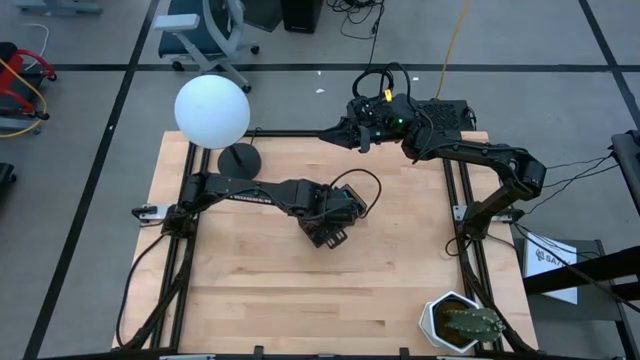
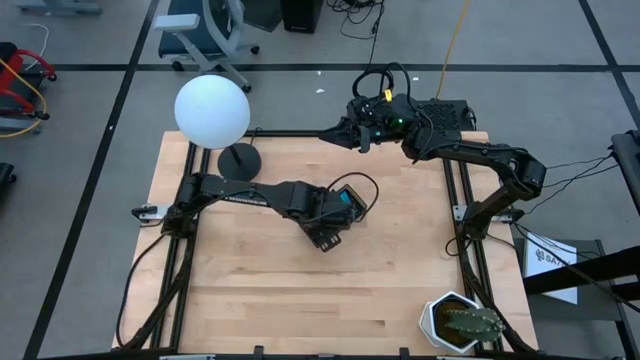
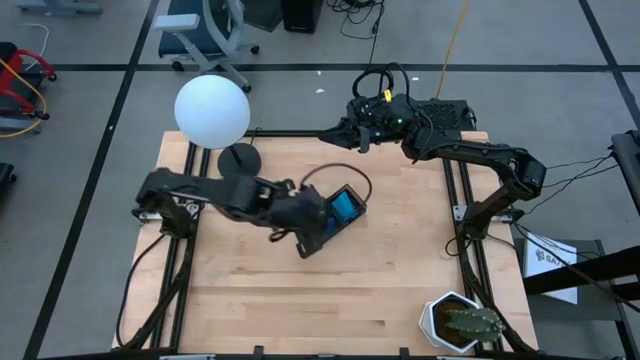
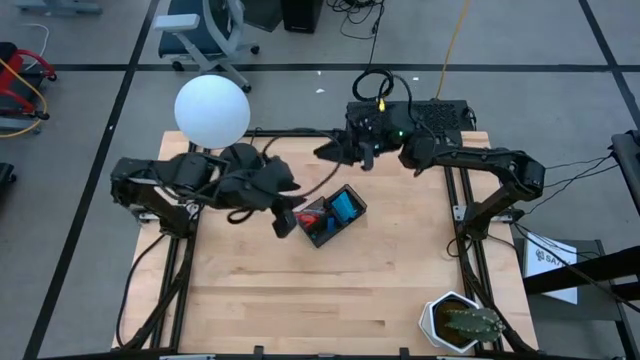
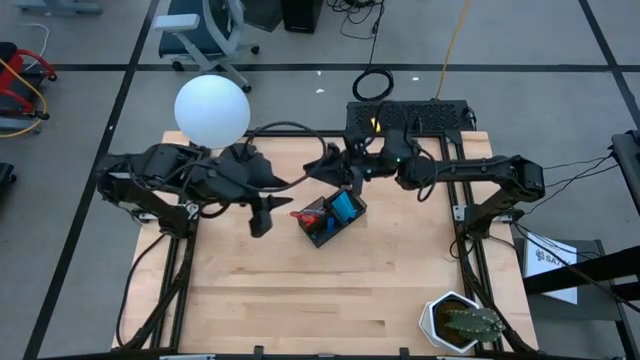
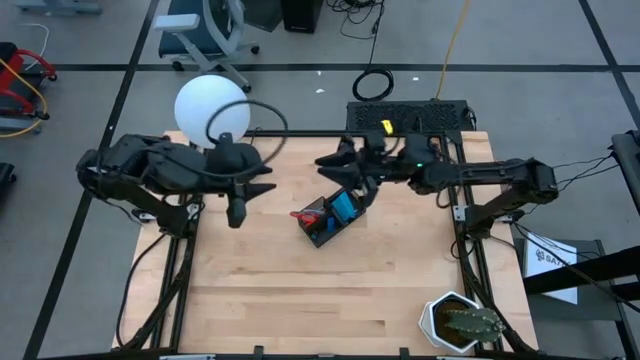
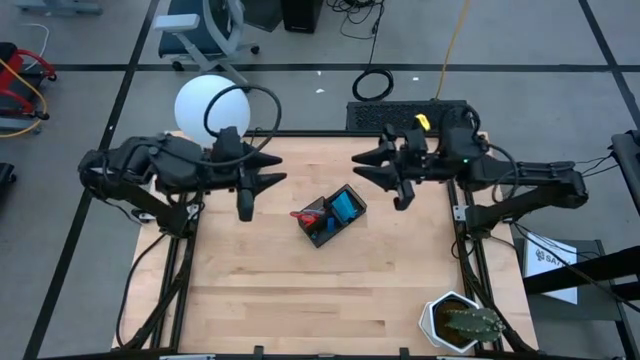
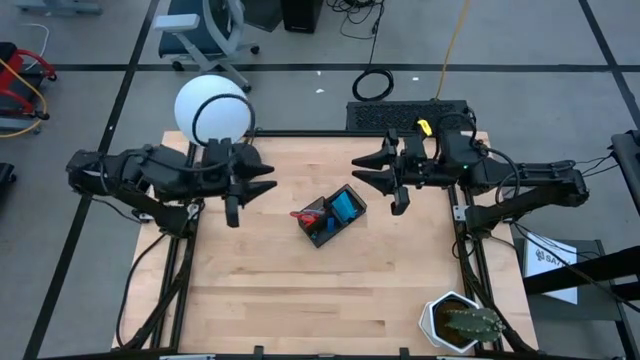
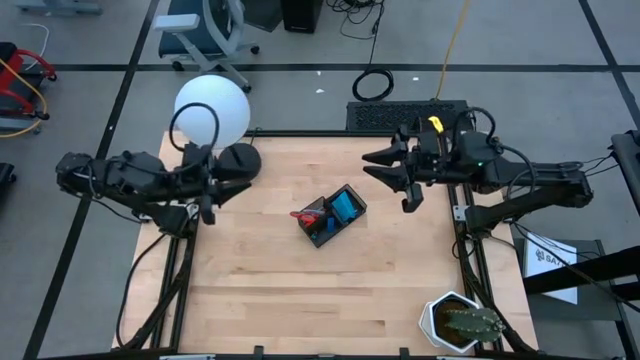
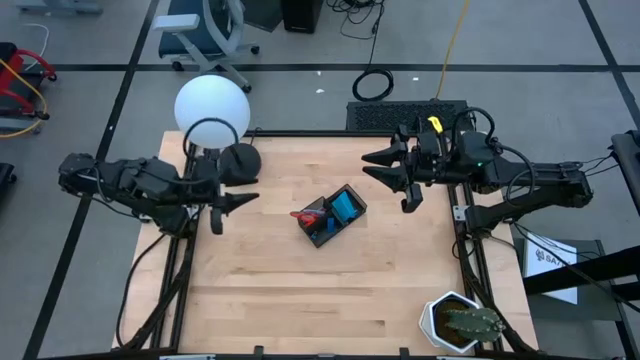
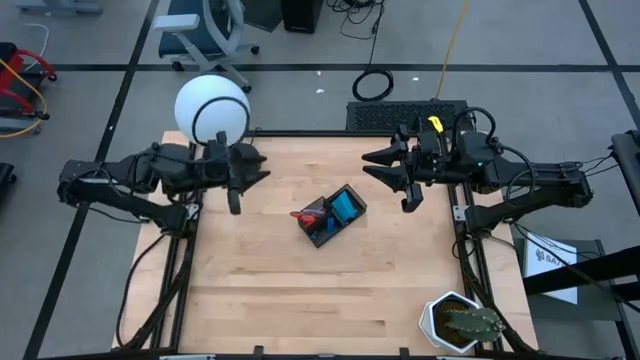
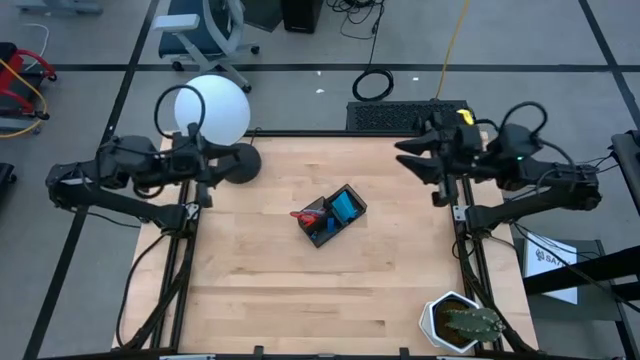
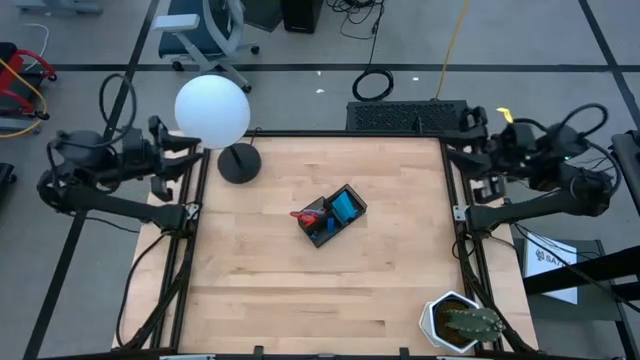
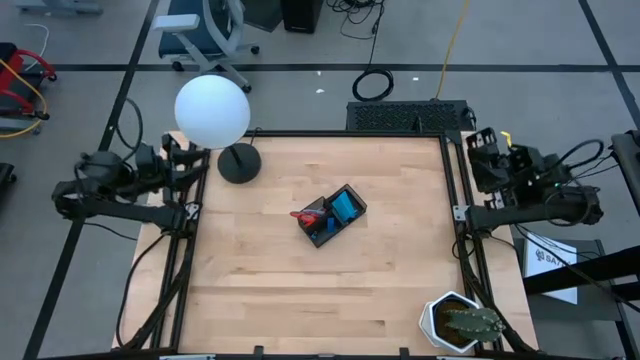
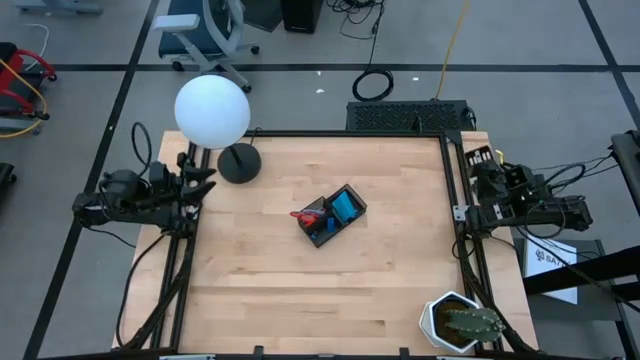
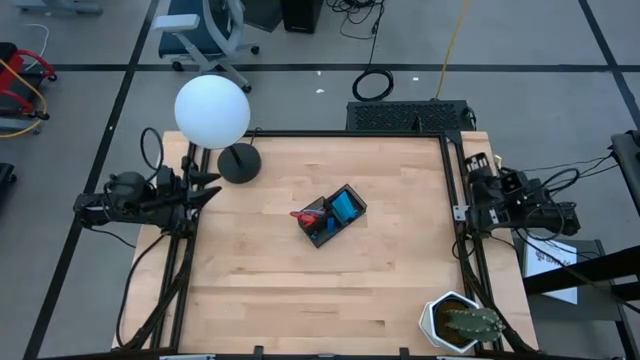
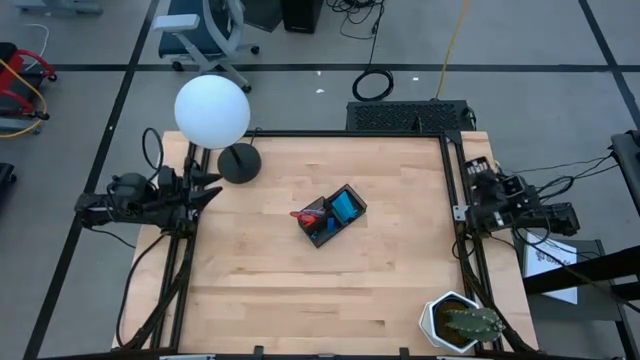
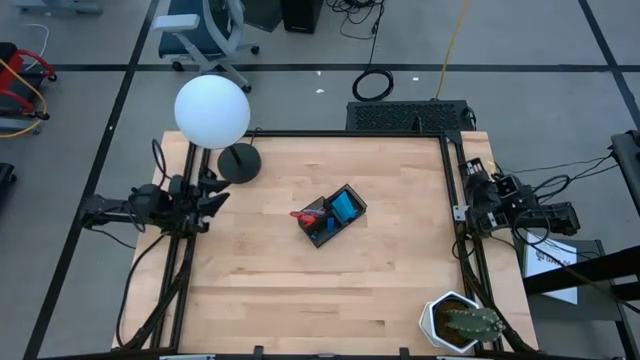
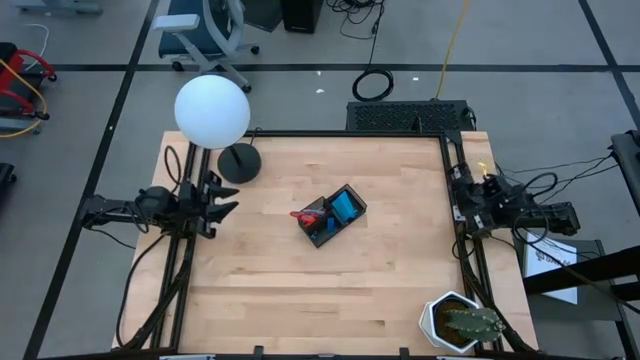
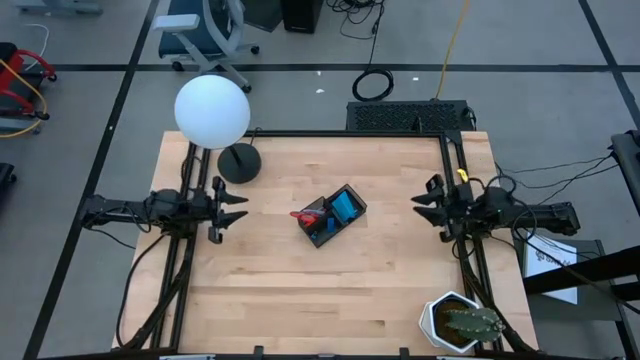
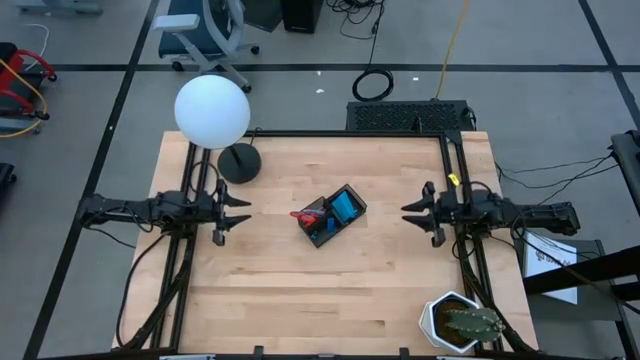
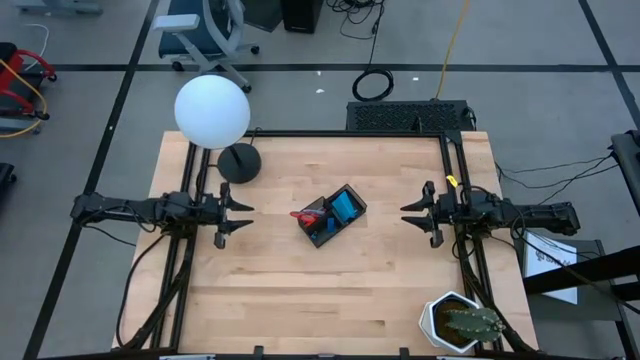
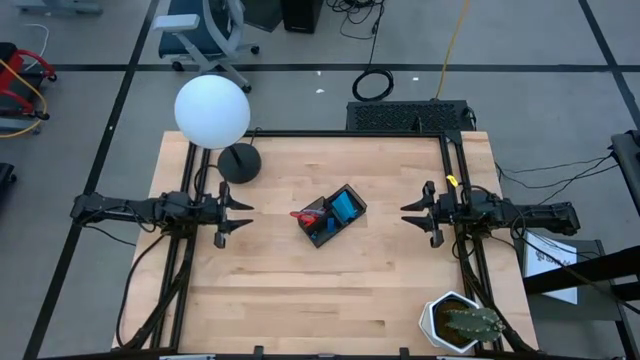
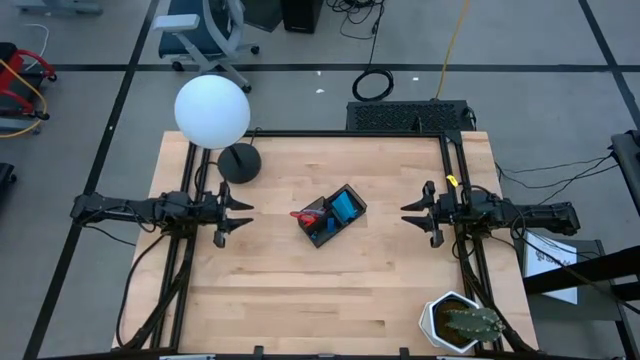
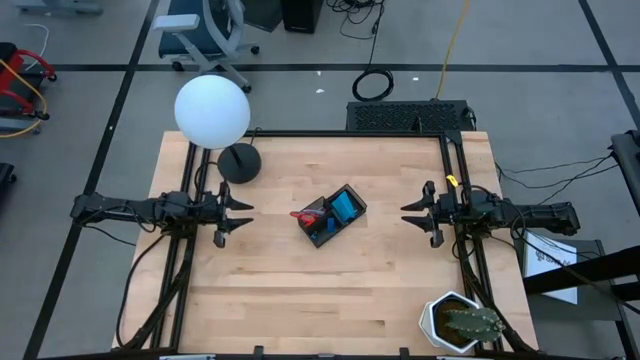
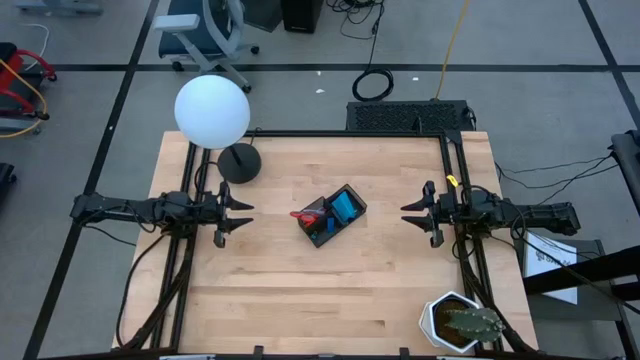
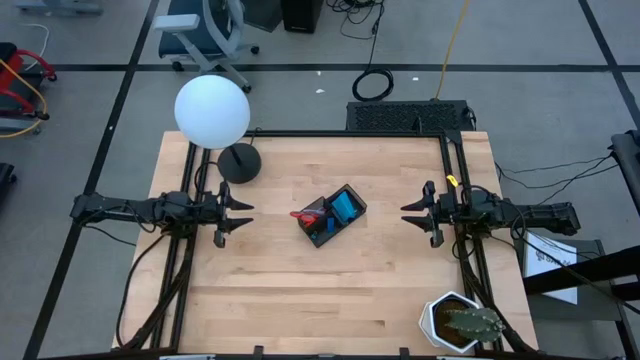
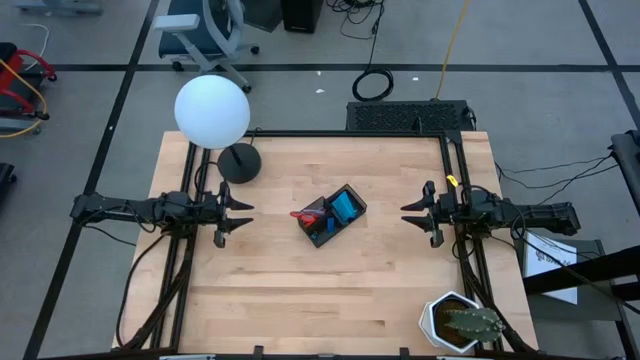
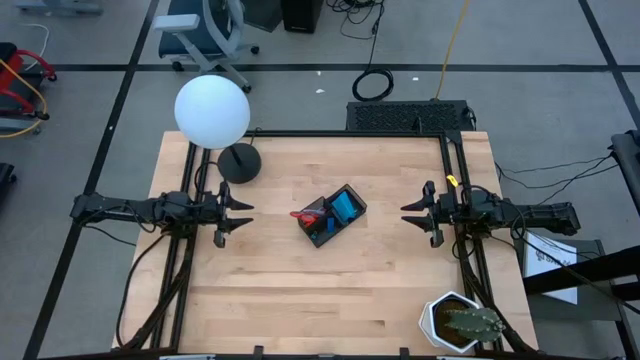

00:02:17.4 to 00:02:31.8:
Task: Pick and place office supplies into organizer
Return to Home Position

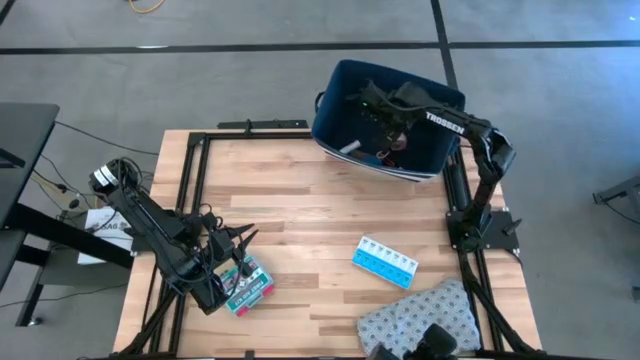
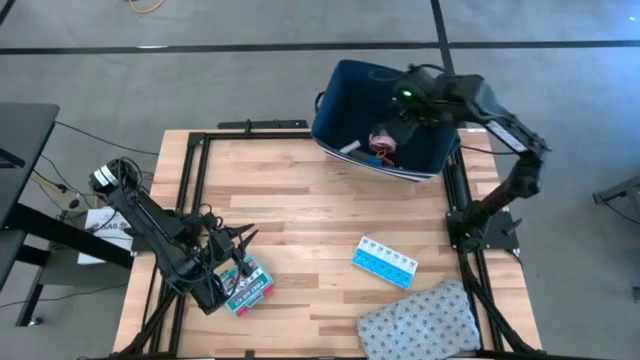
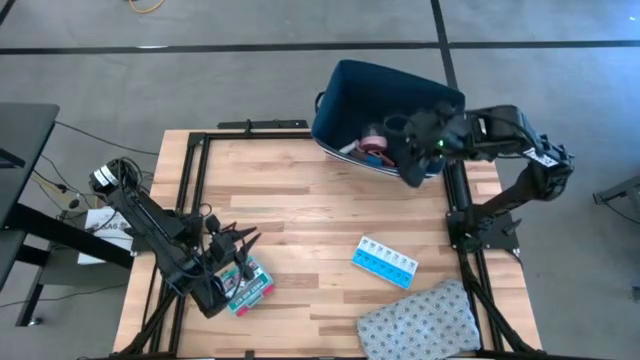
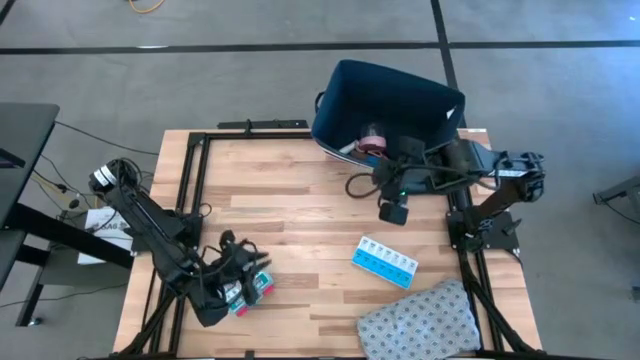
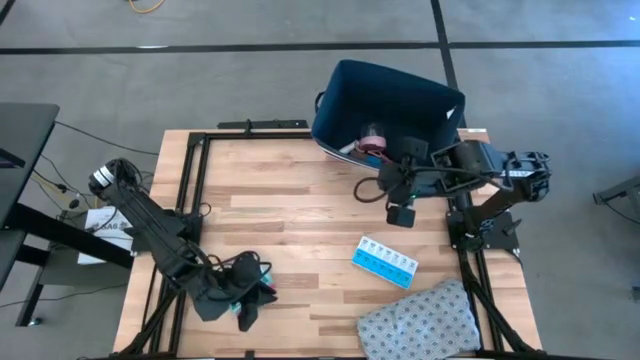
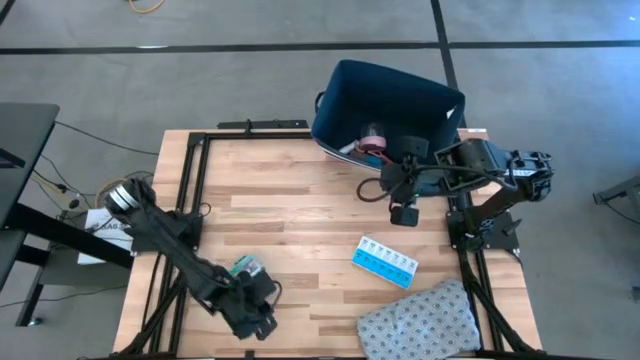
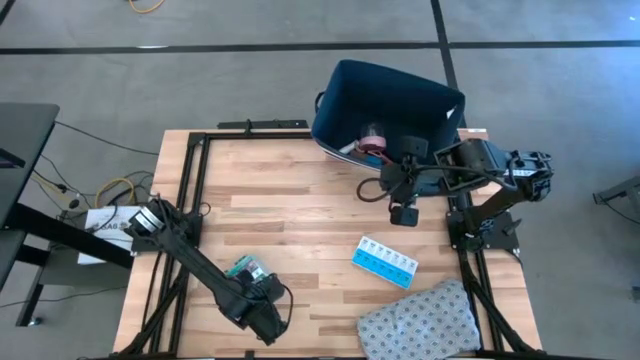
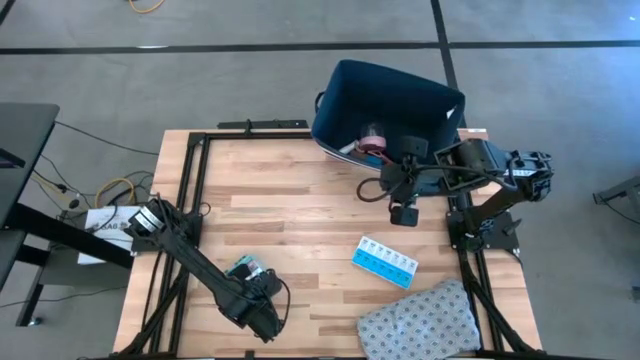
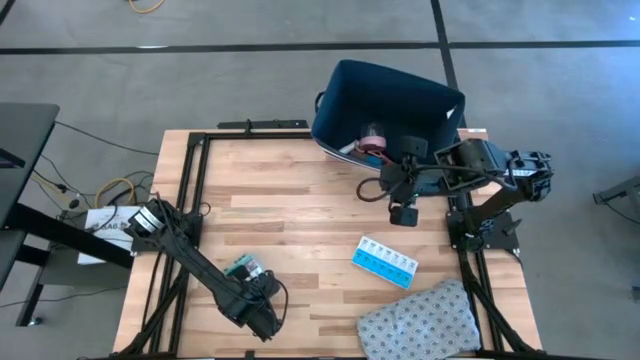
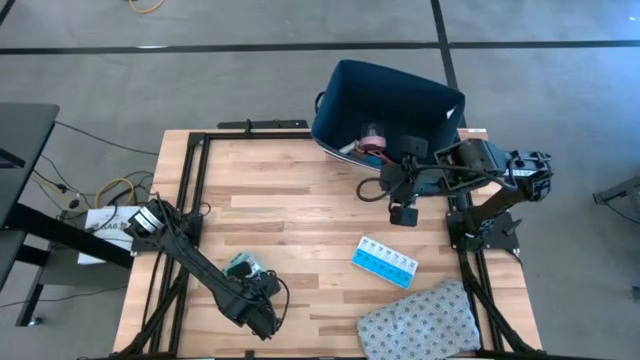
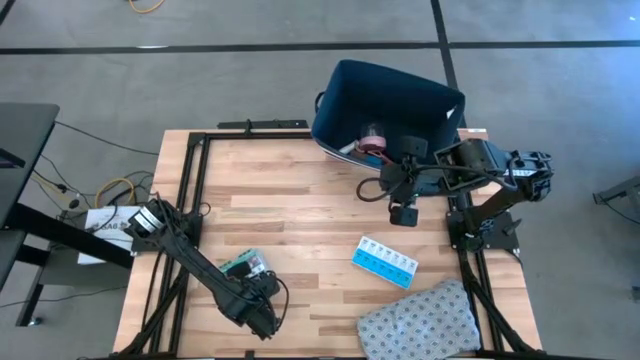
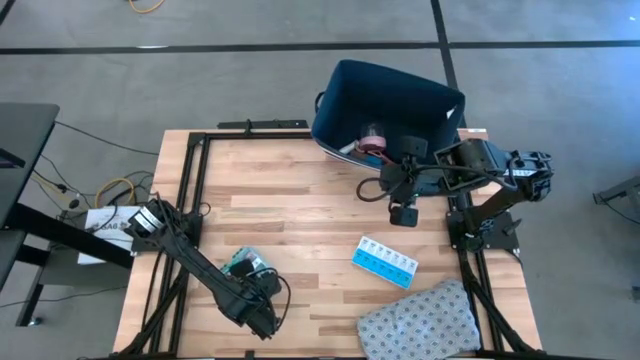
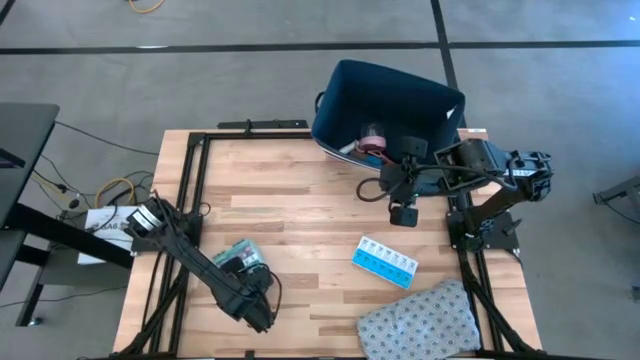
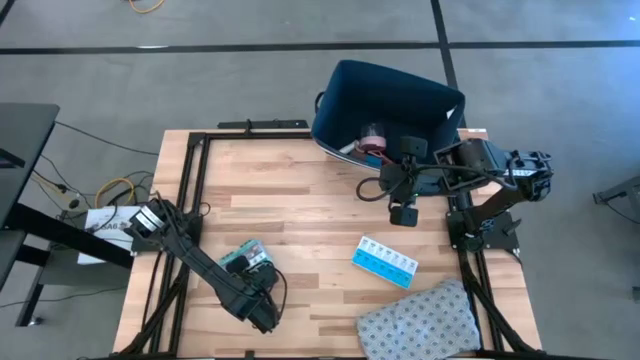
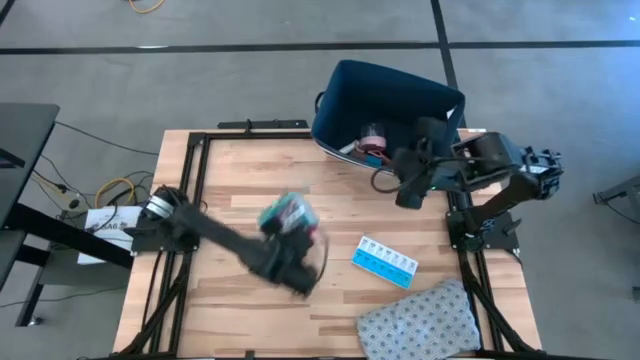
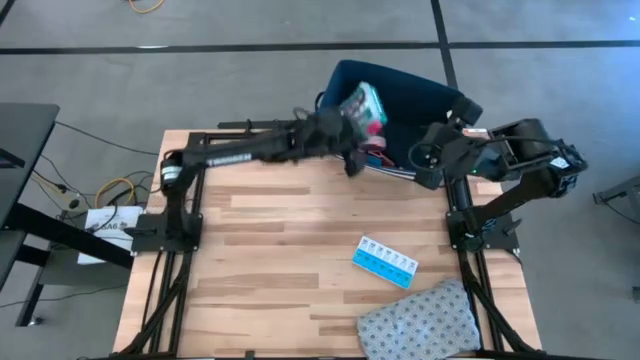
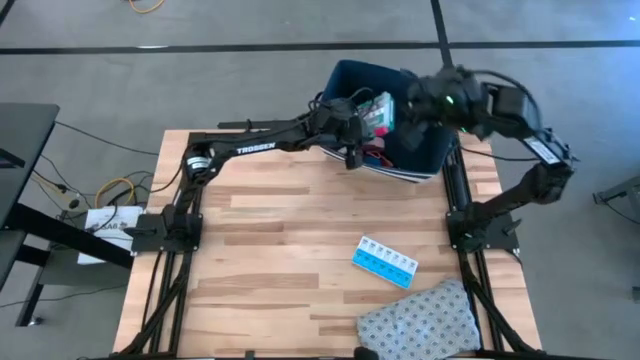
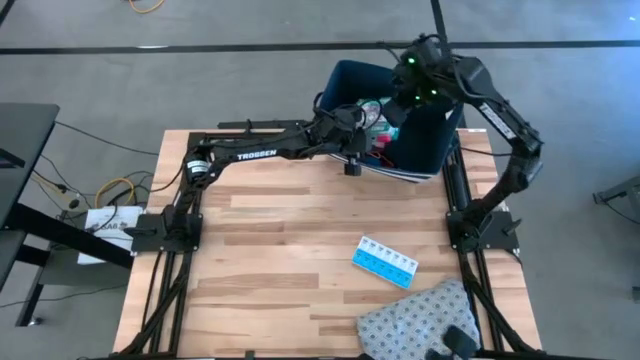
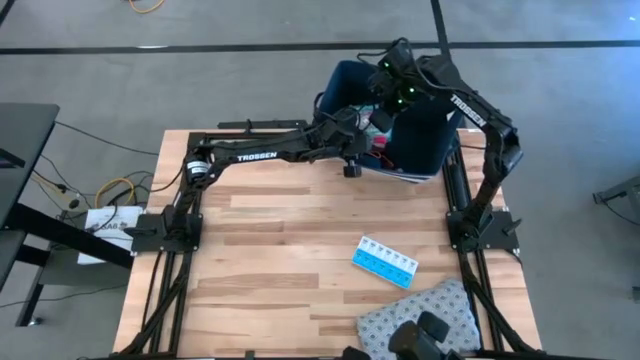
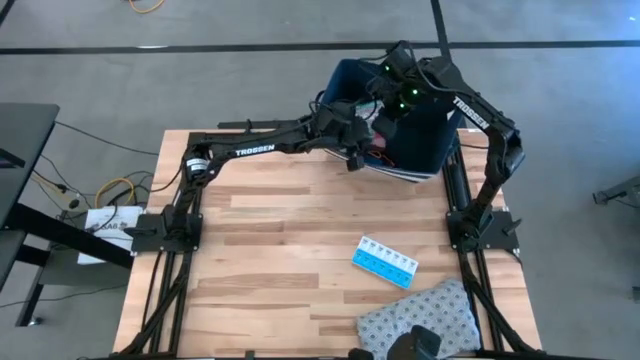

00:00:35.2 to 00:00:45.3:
Task: Pick & place medical supplies in basket/bin
Put the first aid kit box into the blue bin
